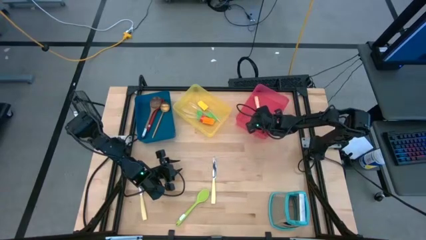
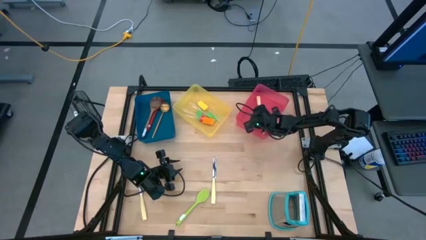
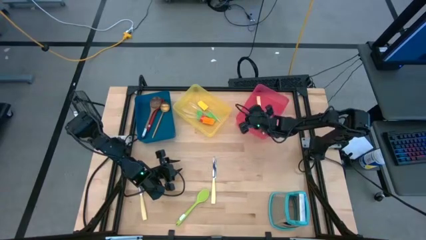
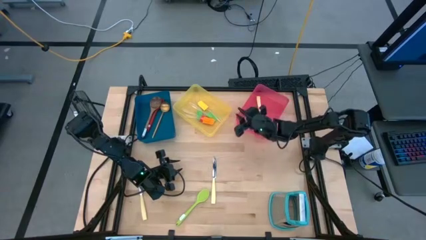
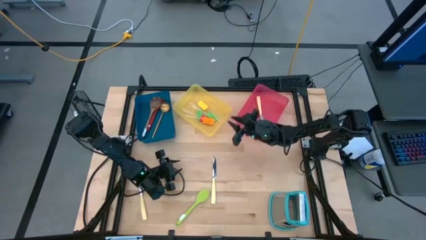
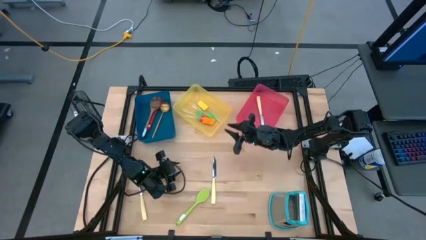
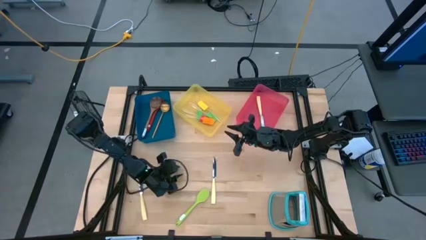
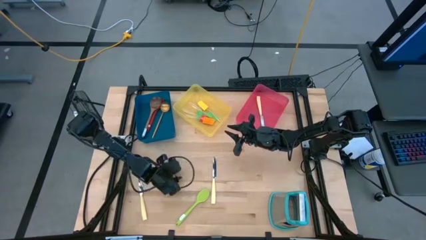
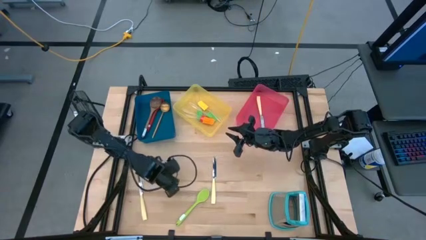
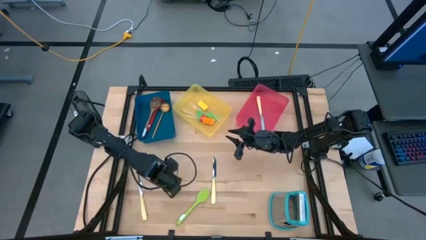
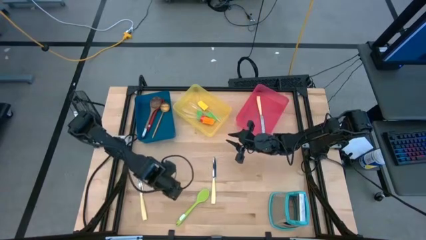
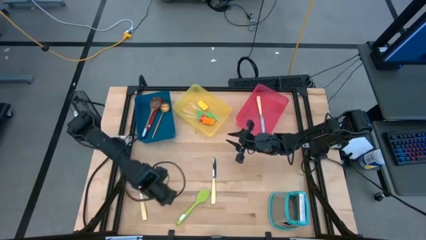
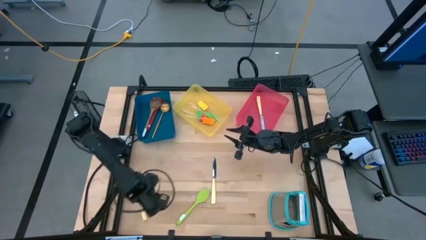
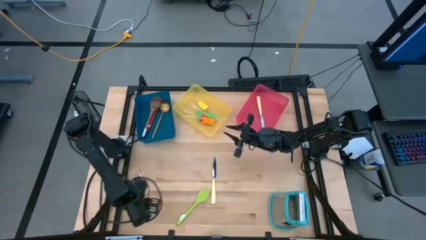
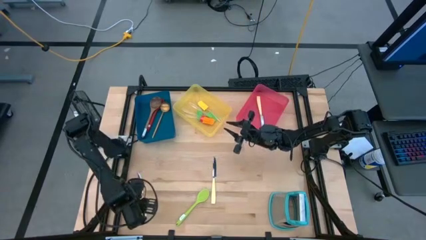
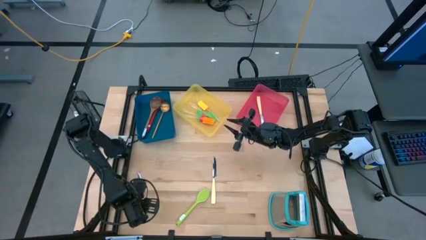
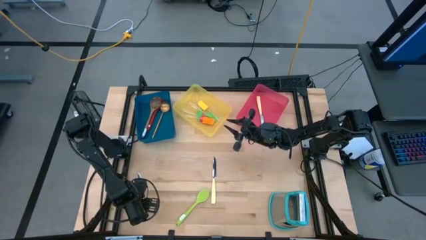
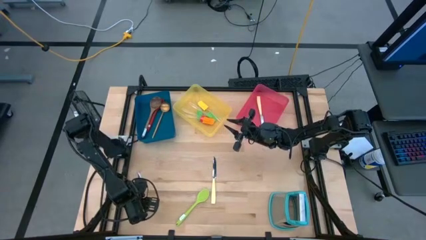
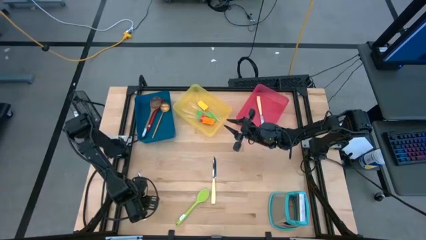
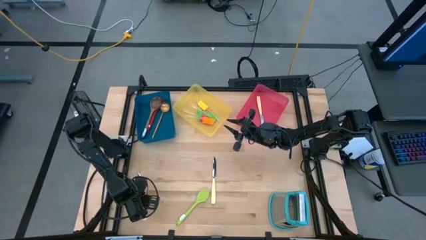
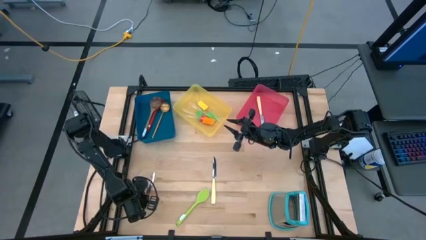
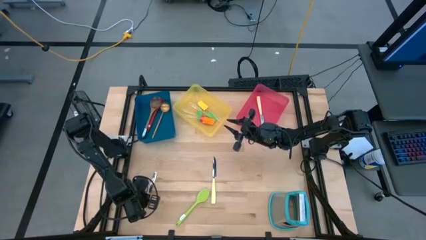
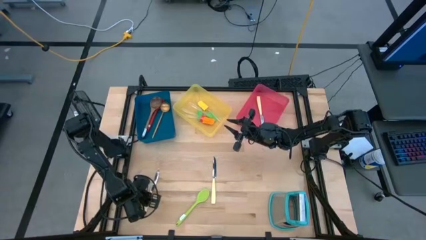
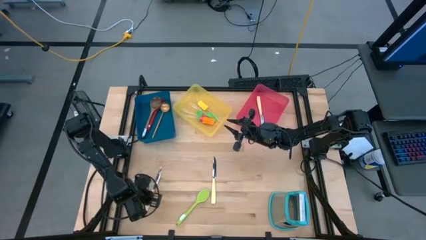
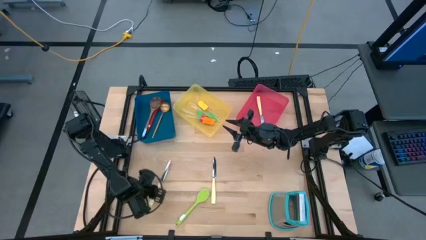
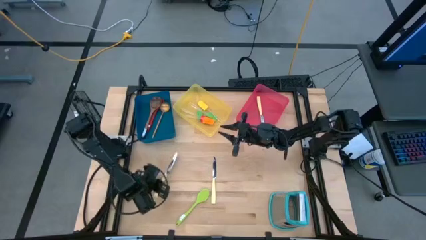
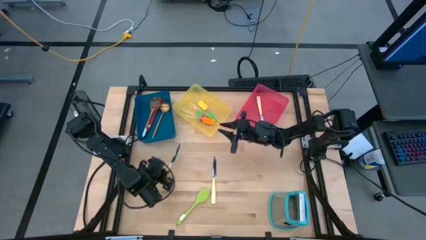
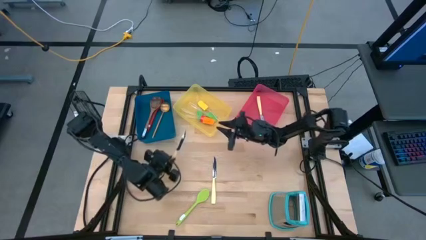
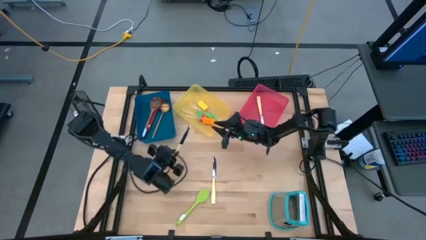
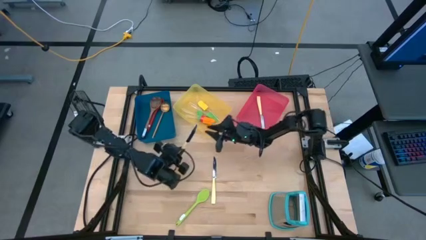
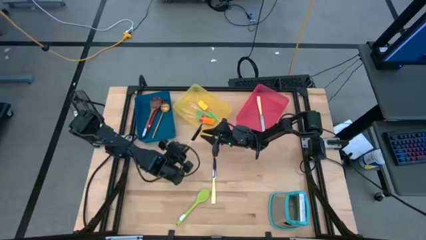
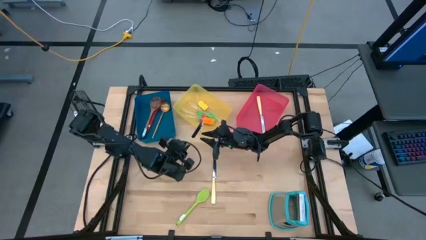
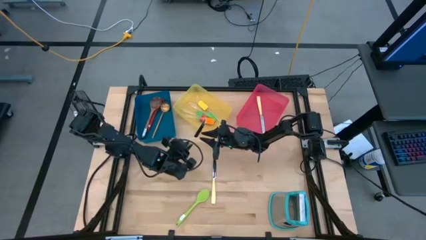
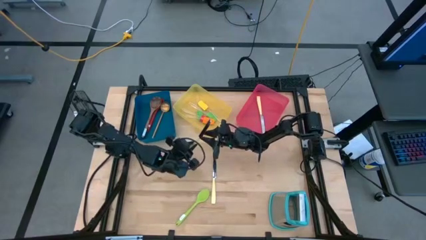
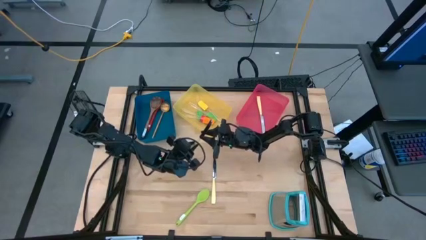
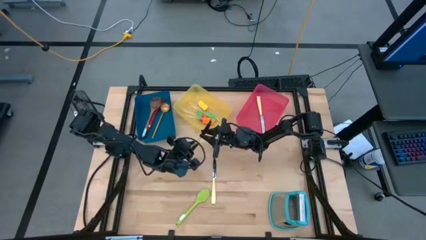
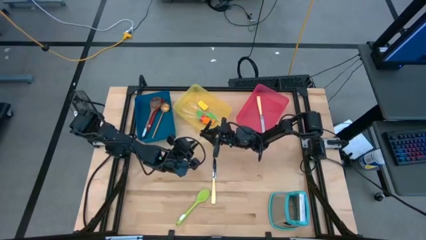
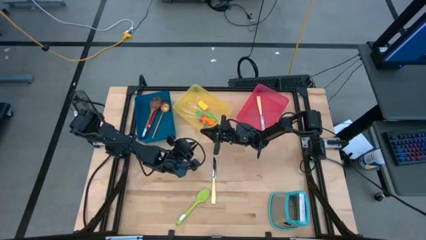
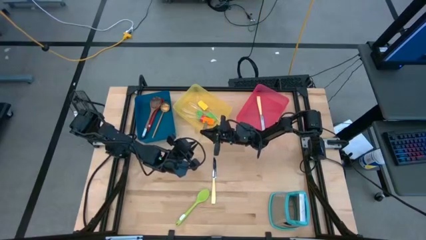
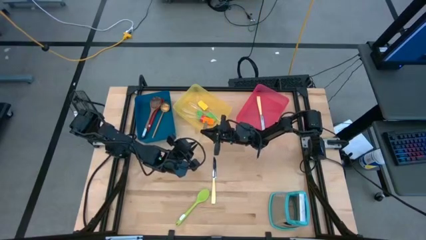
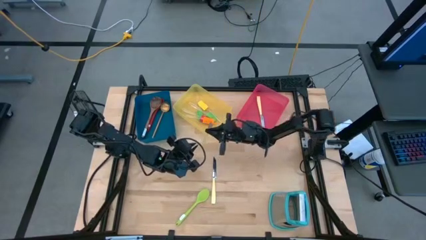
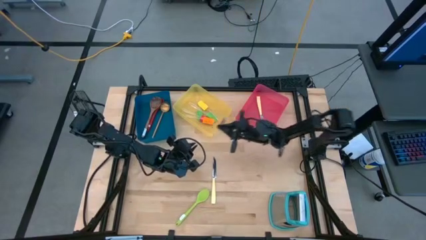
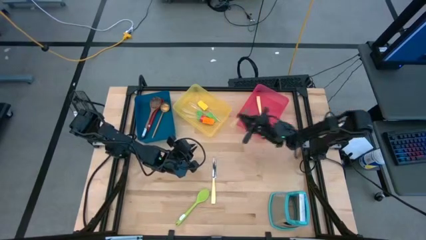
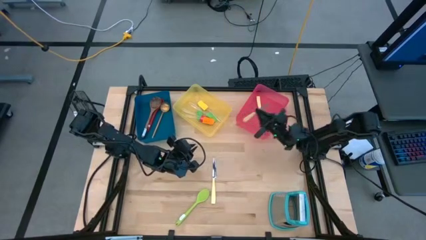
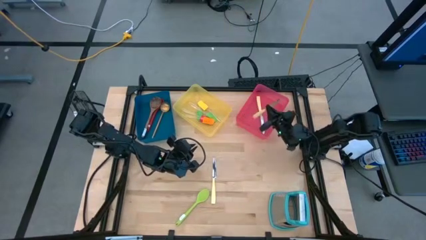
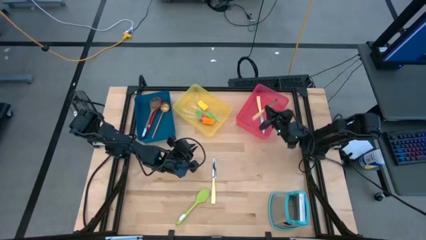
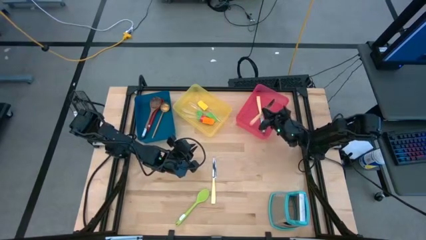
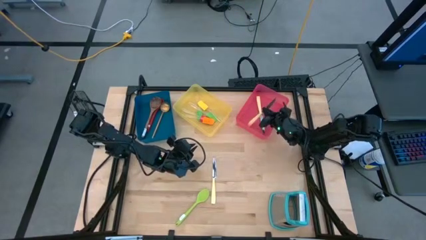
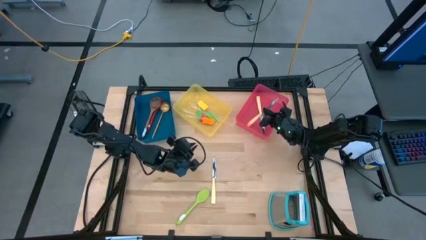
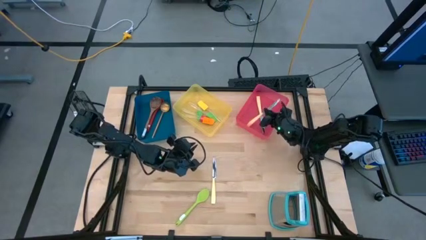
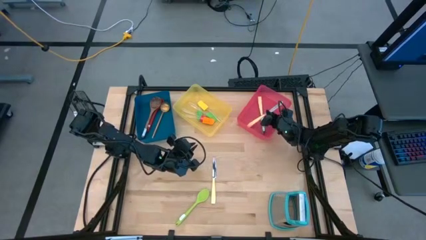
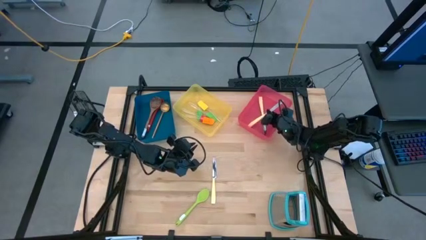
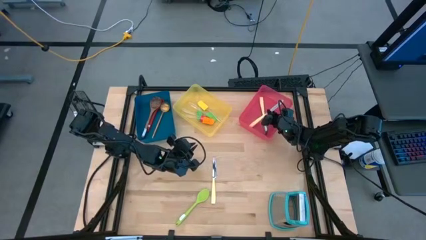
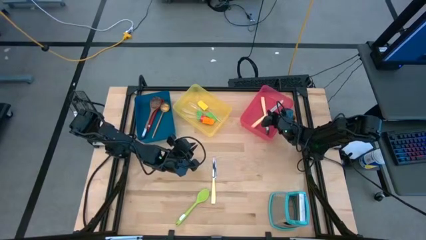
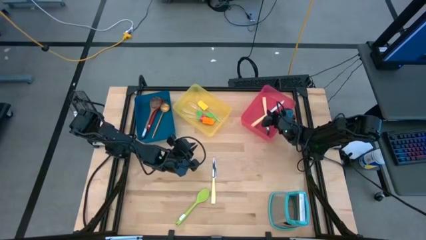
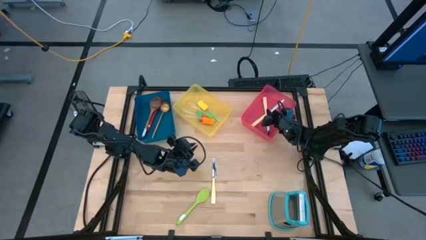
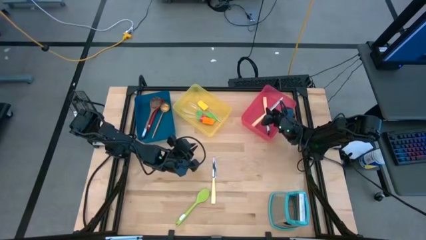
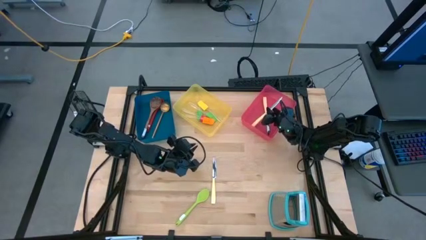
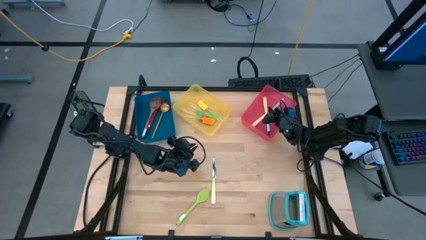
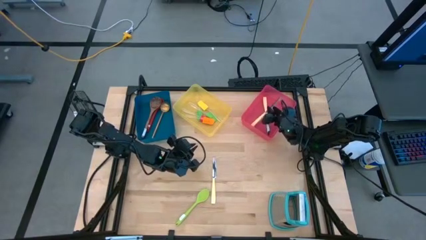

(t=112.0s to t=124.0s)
Task: Pick & Place Kitchen Items
Put the left yellow table knife into the red bin
